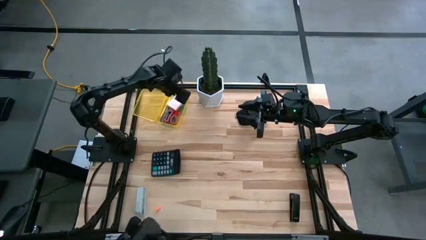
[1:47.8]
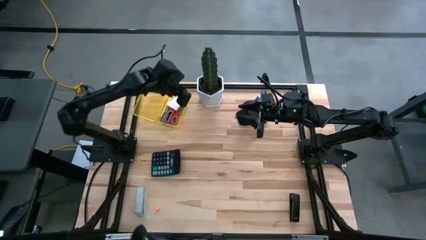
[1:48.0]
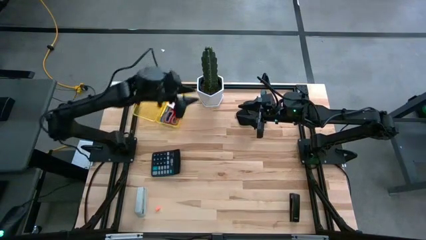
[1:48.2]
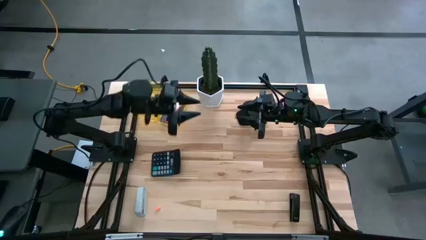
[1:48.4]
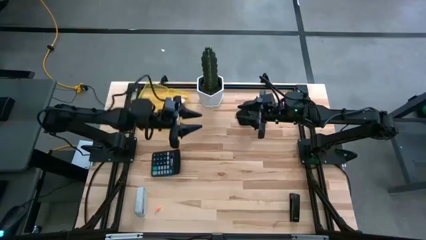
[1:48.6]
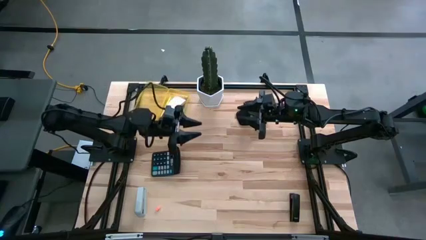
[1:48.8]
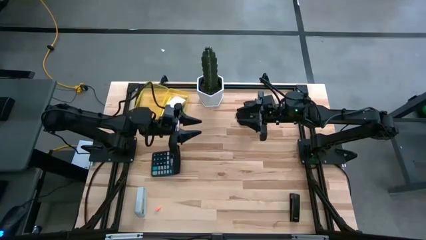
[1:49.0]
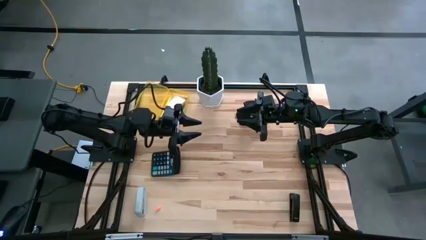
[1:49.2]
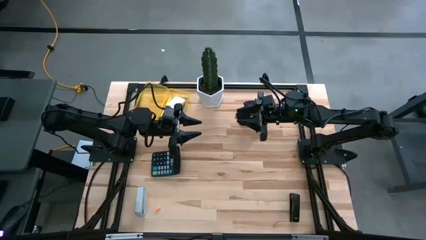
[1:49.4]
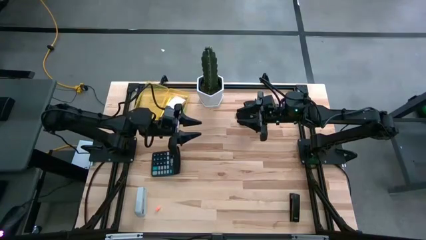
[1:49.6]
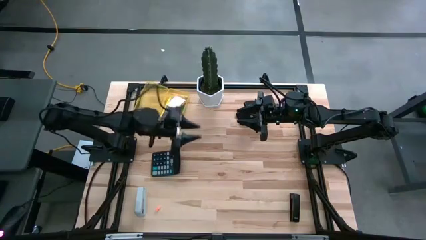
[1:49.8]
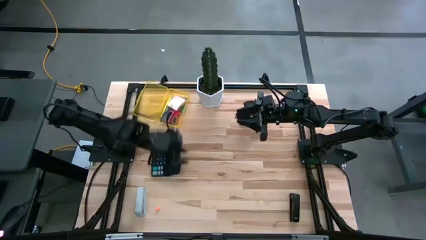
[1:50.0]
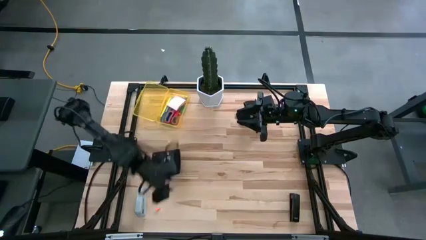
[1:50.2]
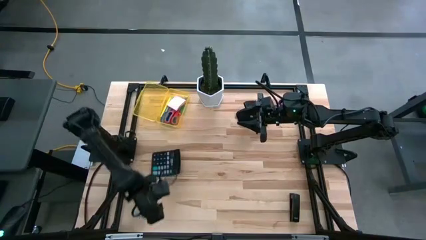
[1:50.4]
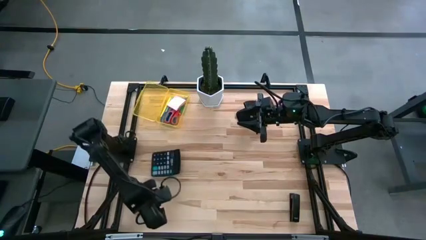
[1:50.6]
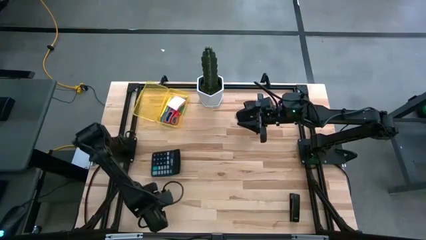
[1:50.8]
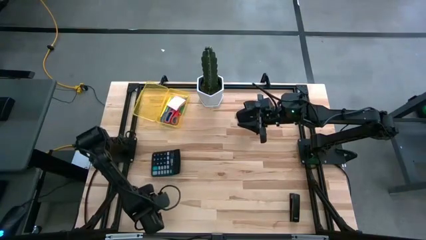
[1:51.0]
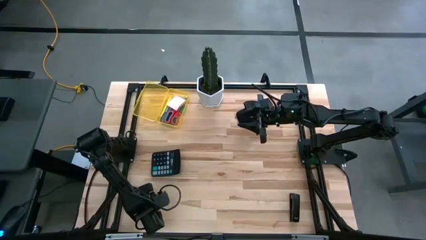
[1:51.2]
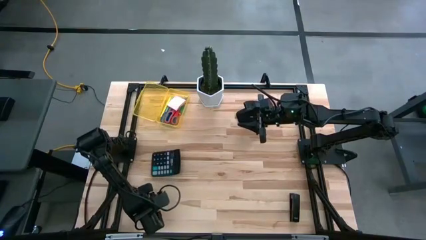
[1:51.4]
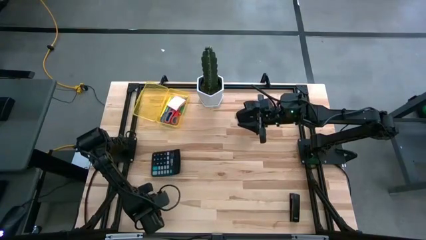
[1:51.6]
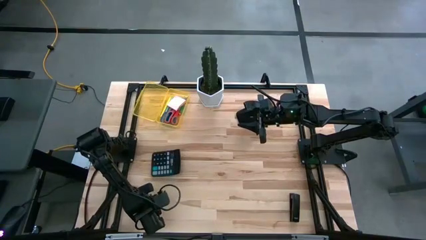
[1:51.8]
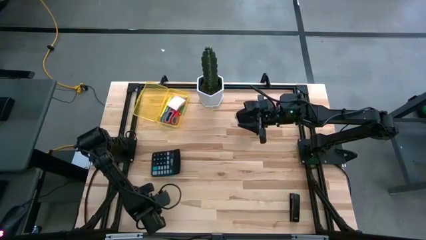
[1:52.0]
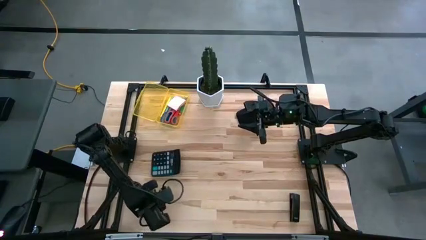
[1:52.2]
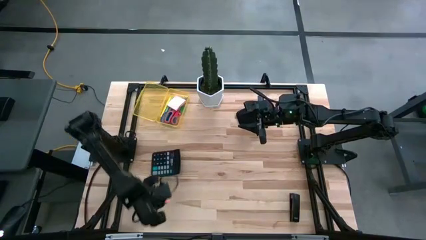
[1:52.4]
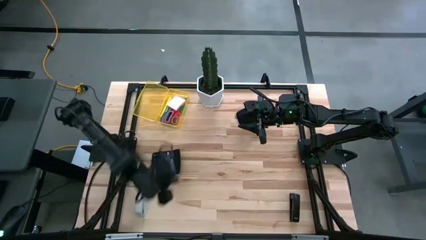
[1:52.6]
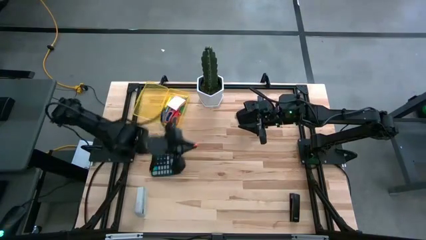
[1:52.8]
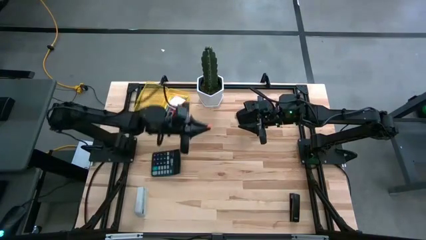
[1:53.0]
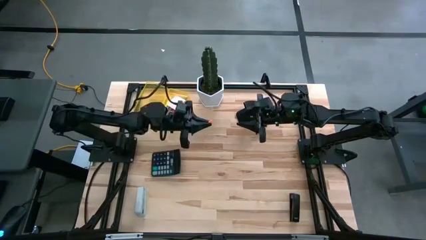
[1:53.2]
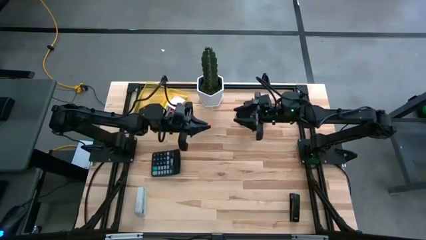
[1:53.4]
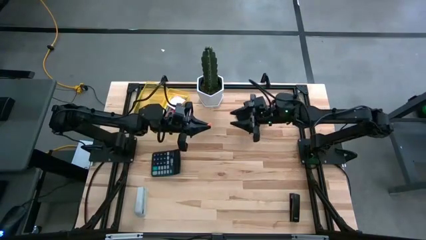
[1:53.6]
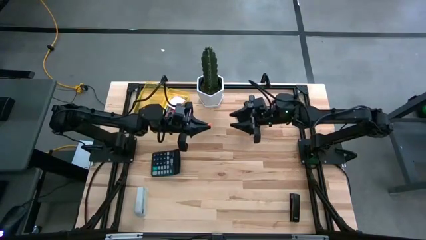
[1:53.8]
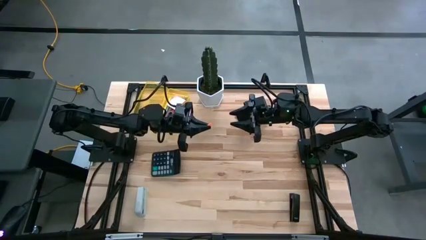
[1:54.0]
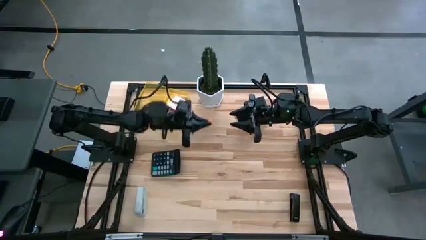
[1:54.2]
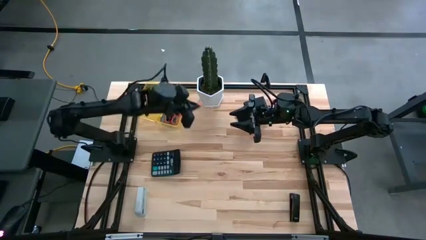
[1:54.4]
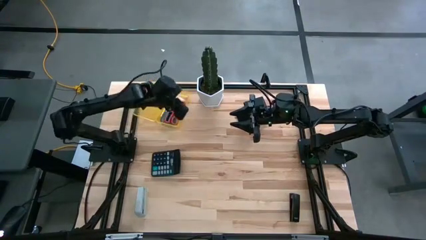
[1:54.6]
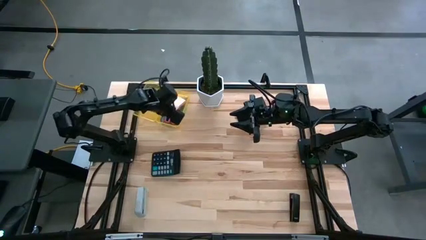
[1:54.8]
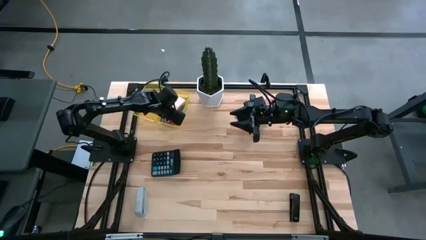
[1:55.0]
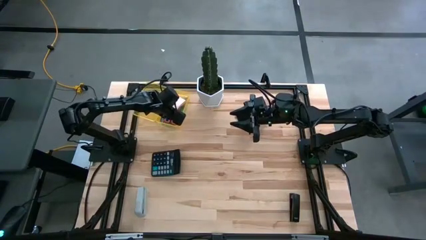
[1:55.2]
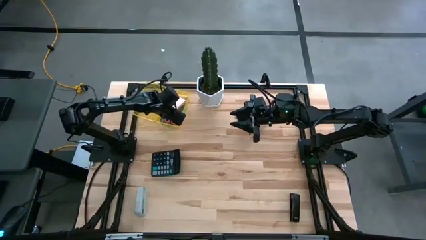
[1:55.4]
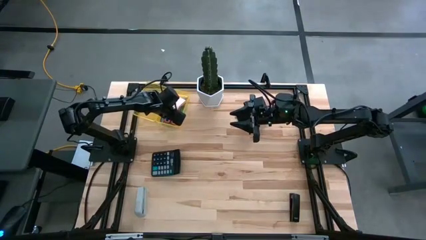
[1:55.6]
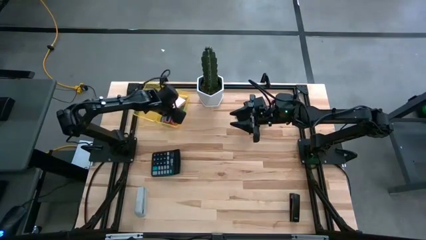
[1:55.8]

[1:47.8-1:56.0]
Task: Pack school essentials
Put the orange cap eraser into the transparent yellow supply box

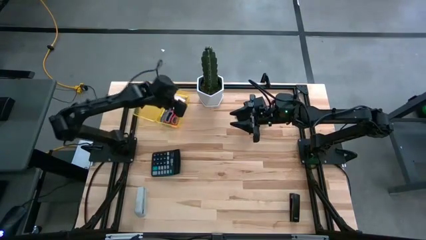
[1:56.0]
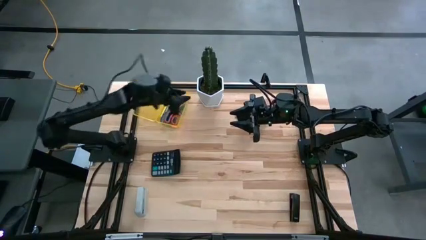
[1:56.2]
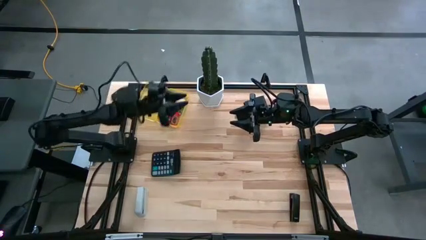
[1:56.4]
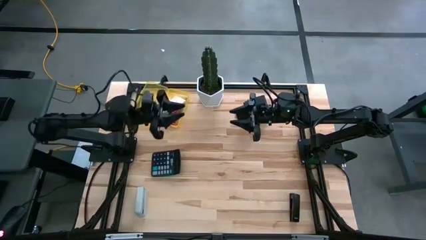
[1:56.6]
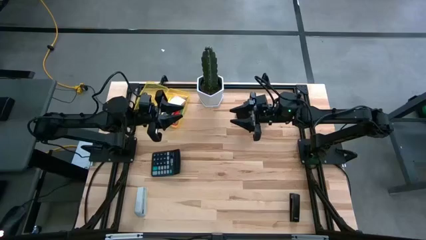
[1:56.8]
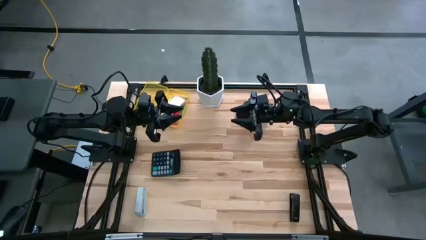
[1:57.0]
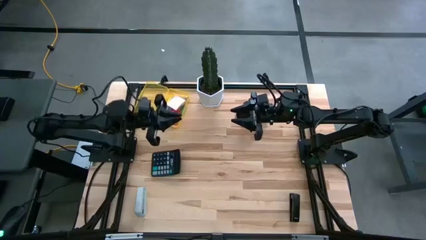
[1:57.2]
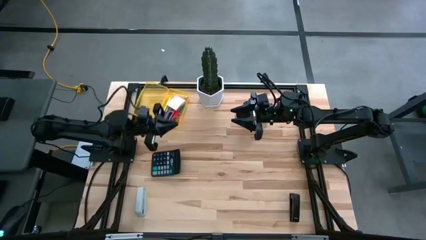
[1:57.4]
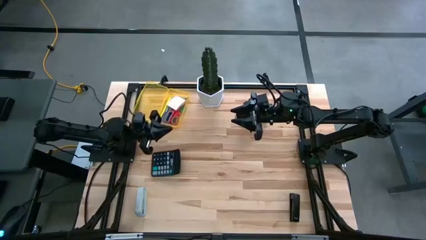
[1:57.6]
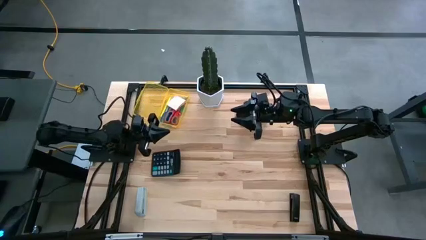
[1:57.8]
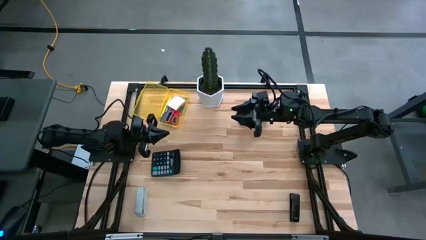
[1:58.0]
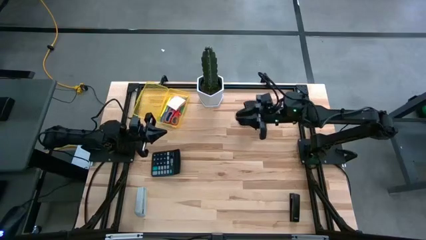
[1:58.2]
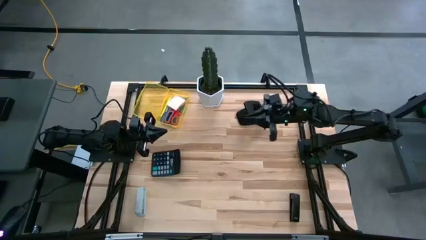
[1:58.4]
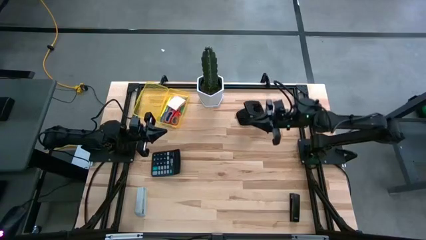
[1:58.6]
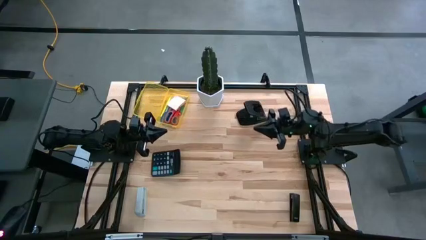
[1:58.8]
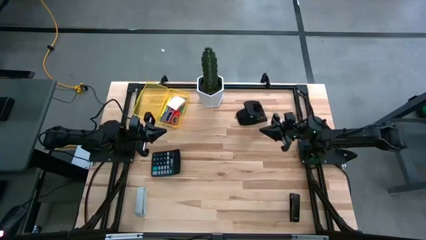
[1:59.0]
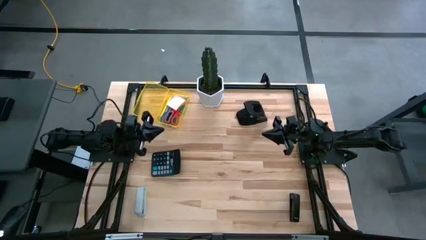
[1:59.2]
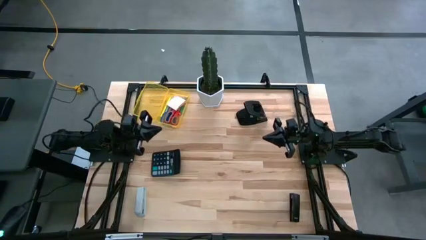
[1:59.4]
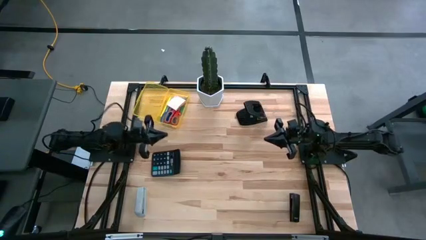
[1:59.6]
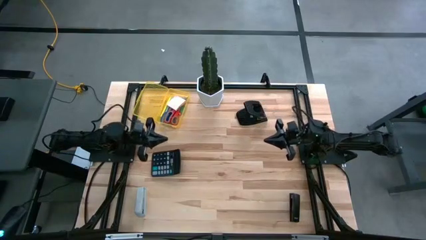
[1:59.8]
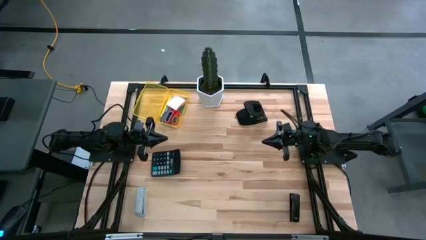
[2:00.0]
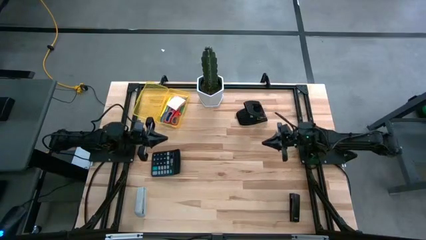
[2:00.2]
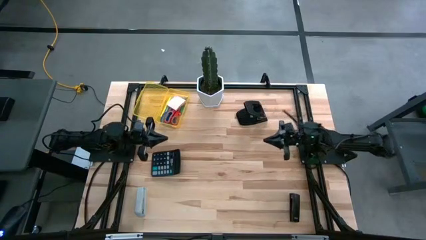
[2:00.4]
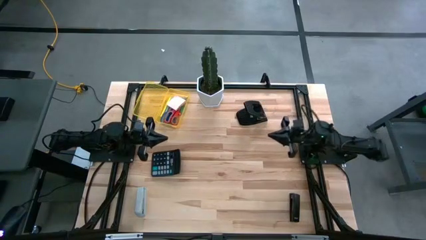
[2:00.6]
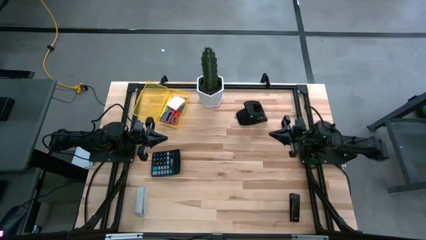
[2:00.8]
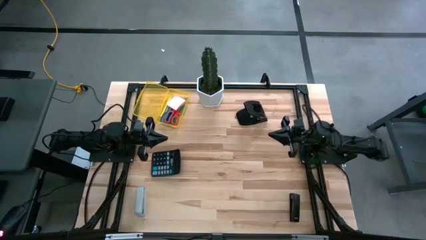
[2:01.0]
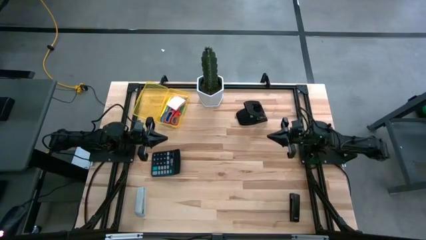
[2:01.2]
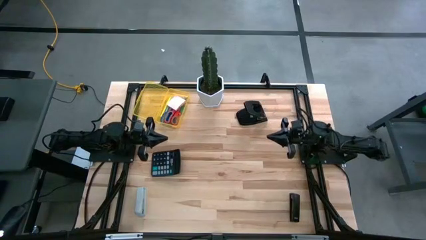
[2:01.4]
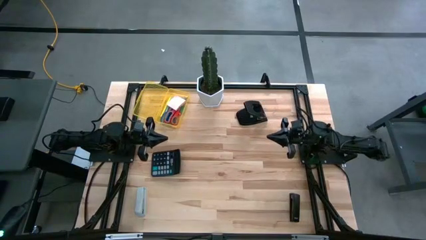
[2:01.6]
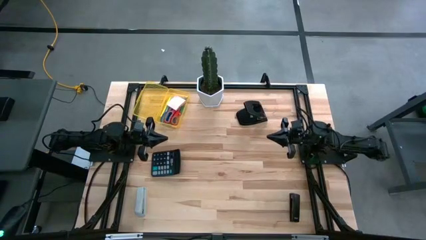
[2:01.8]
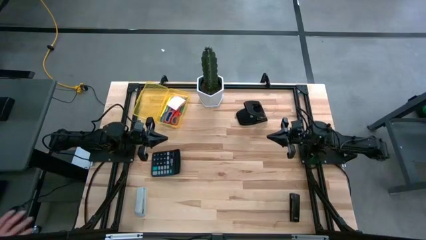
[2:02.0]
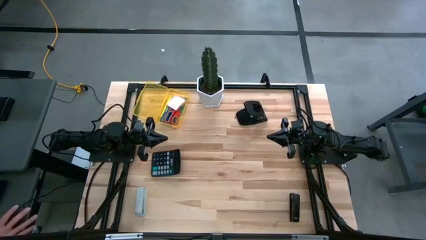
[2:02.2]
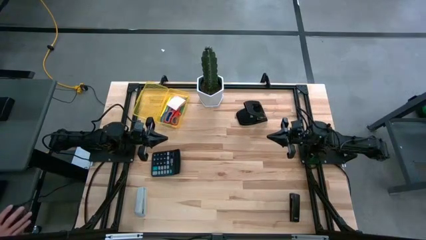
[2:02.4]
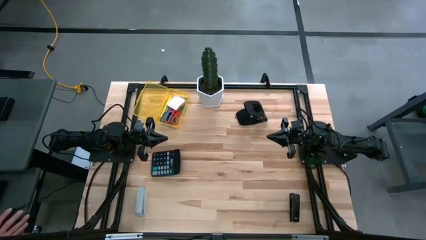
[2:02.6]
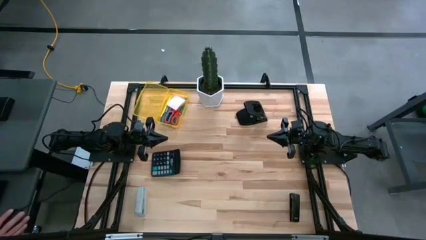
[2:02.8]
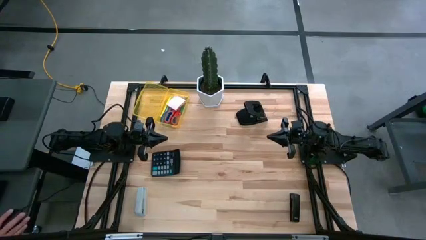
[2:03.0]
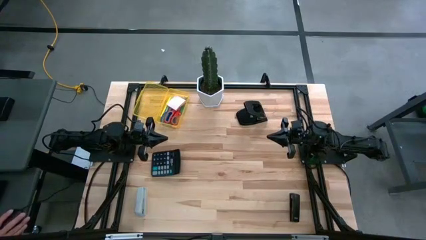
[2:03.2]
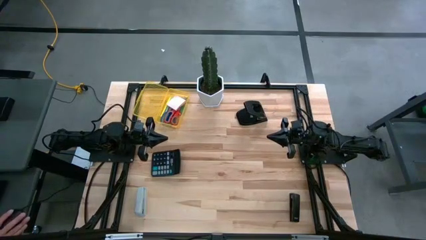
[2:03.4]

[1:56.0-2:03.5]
Return to Home Position
